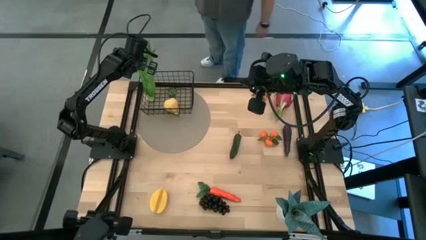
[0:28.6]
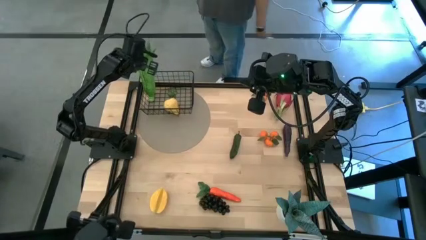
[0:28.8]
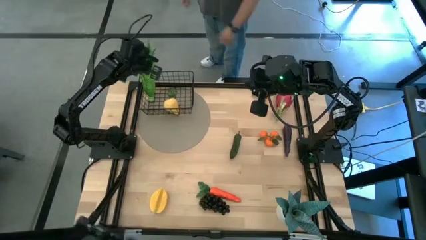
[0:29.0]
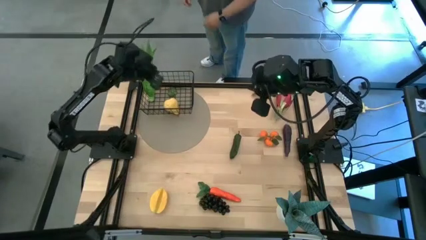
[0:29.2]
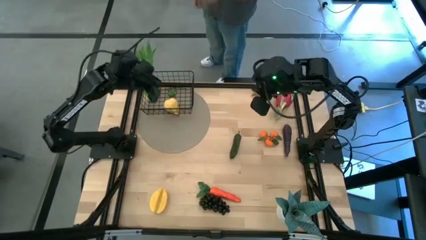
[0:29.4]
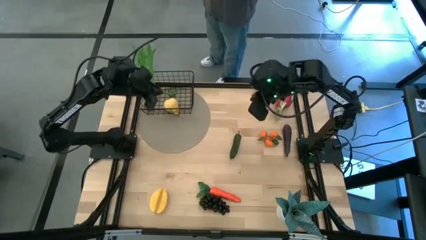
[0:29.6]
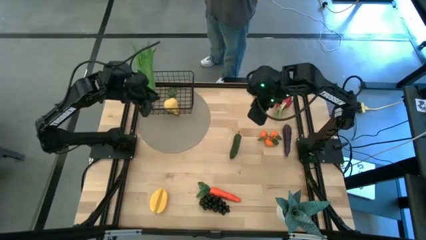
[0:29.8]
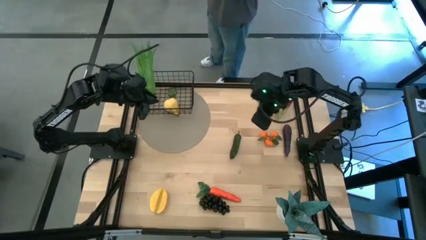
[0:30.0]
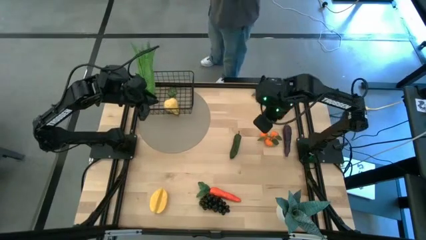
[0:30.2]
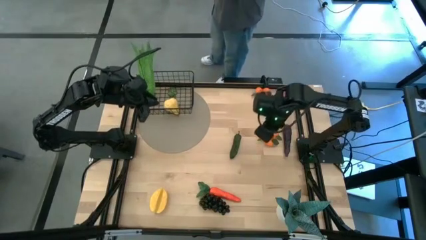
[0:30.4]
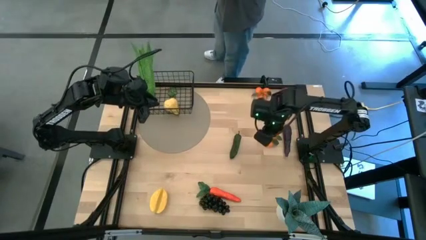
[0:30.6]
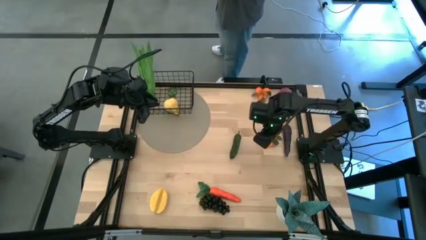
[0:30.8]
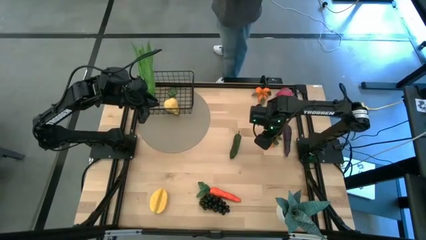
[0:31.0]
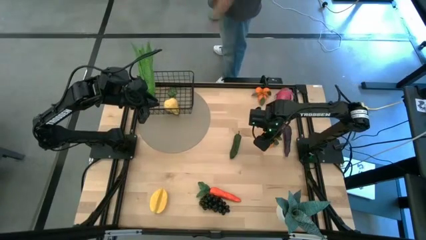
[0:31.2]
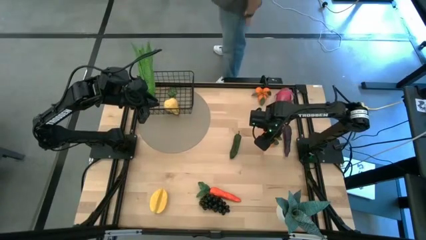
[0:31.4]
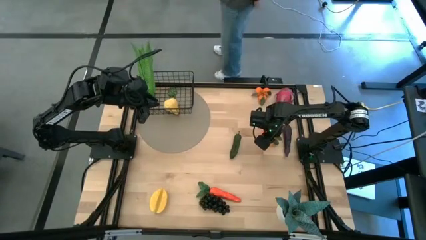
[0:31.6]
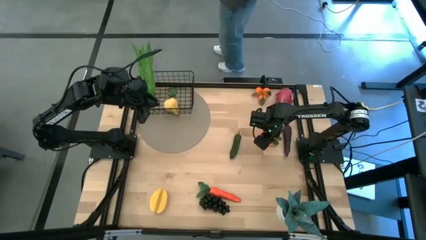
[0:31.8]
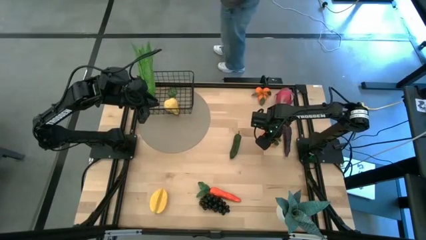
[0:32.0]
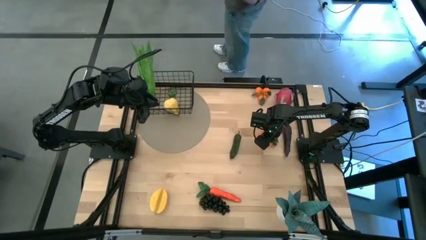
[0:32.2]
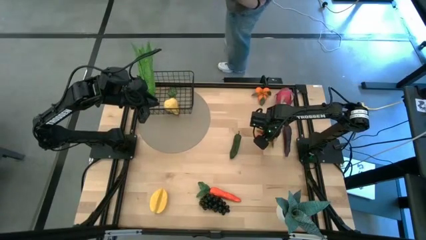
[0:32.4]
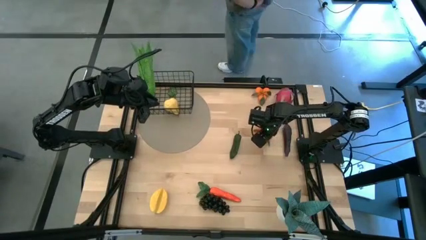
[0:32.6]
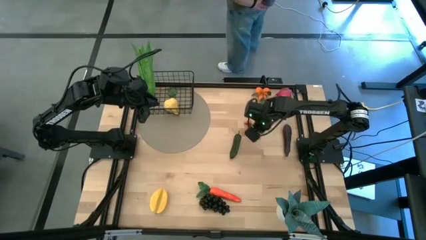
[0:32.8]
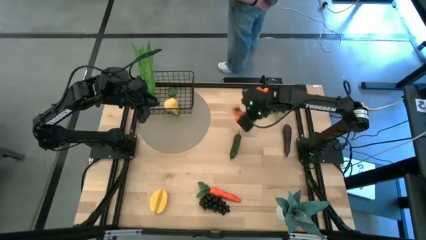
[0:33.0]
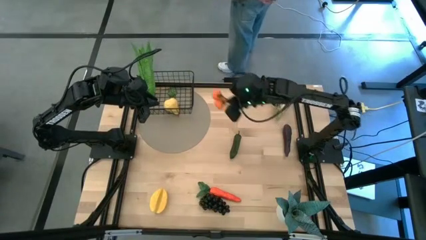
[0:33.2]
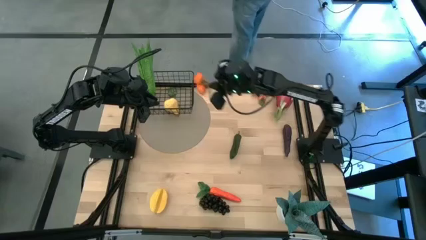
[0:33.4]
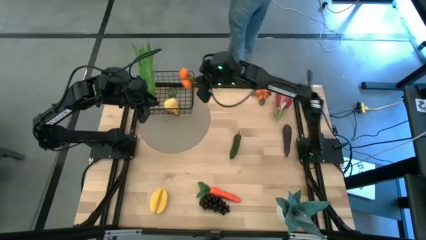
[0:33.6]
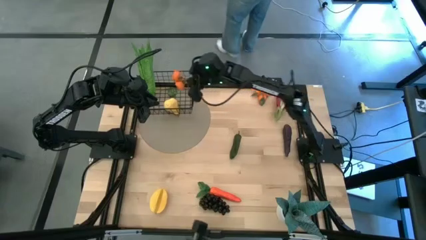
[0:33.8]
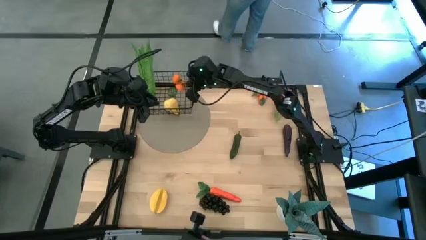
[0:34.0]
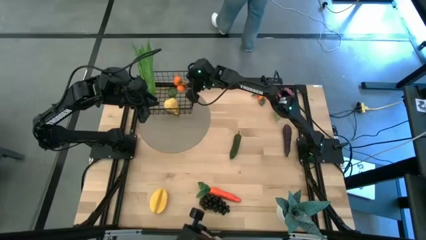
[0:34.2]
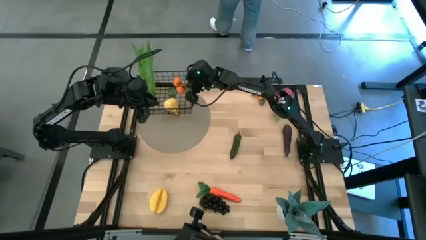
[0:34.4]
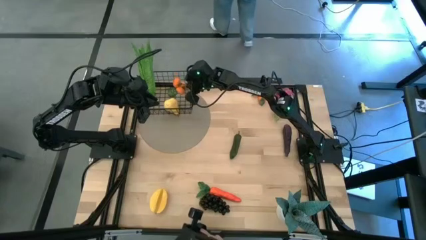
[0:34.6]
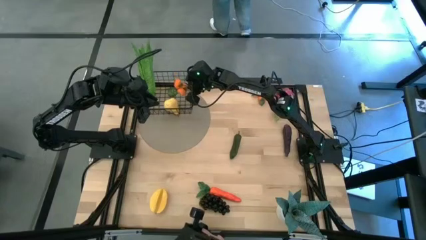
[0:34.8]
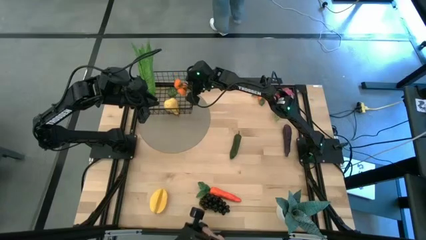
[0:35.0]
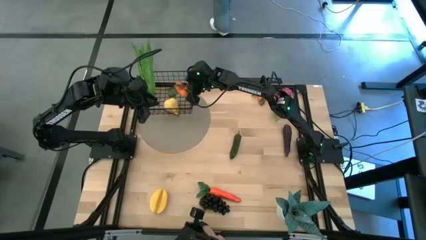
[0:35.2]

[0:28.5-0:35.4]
Task: Build produce basket
Put the bottom orange tangerine into the wire basket

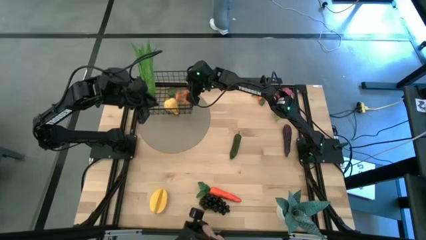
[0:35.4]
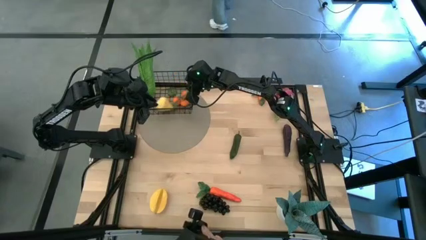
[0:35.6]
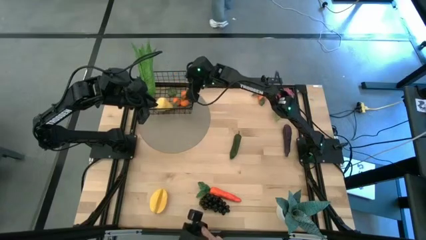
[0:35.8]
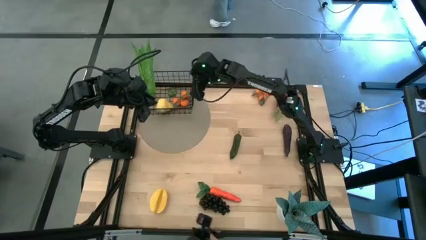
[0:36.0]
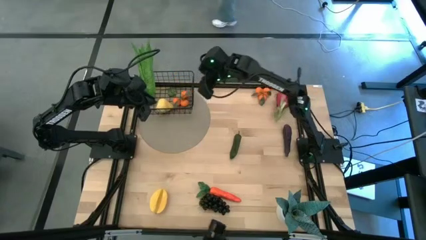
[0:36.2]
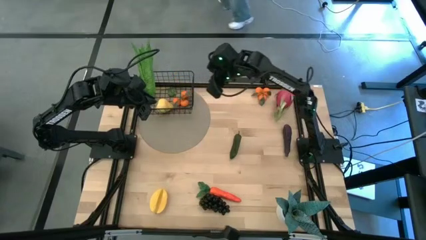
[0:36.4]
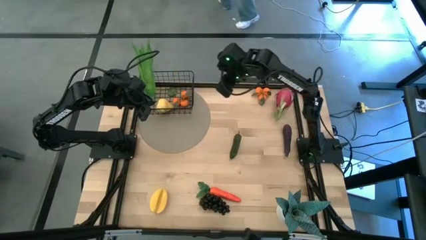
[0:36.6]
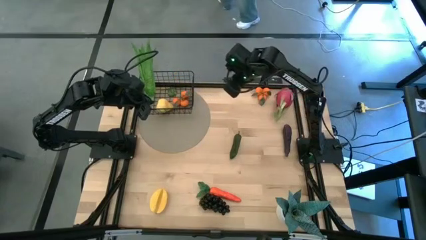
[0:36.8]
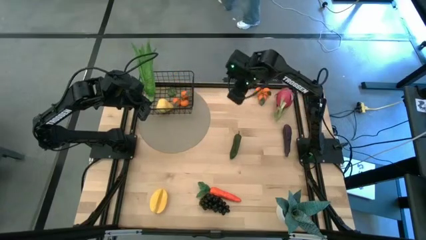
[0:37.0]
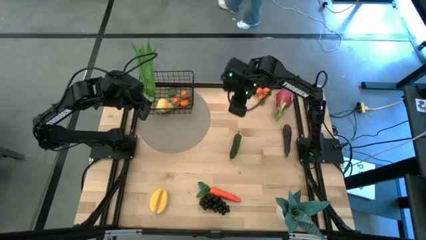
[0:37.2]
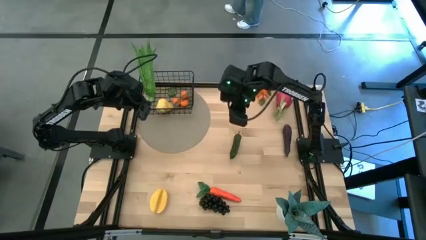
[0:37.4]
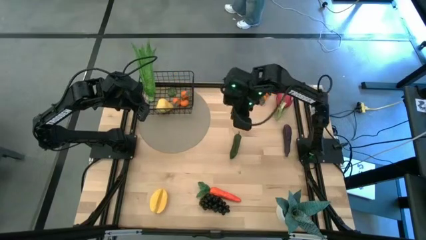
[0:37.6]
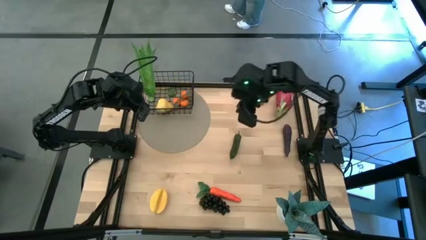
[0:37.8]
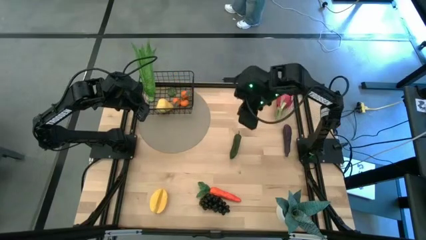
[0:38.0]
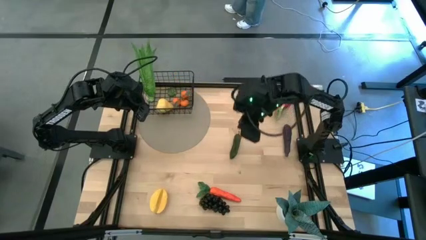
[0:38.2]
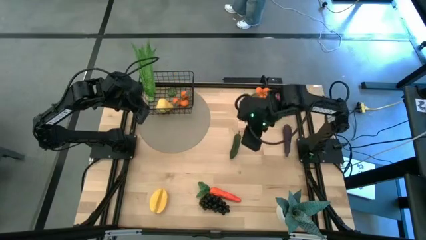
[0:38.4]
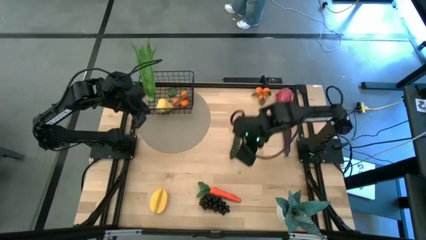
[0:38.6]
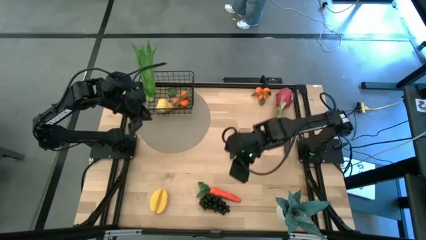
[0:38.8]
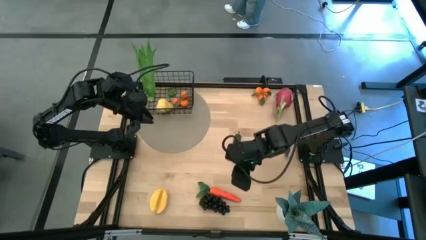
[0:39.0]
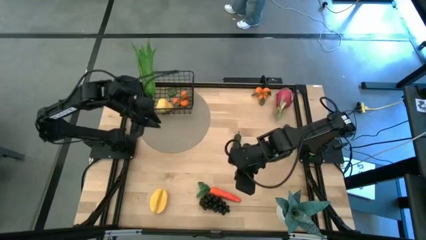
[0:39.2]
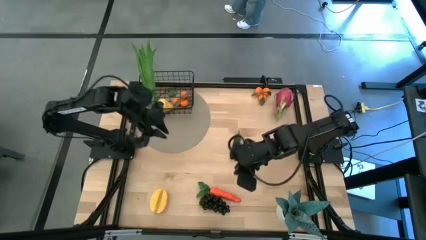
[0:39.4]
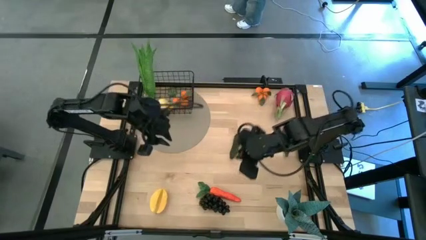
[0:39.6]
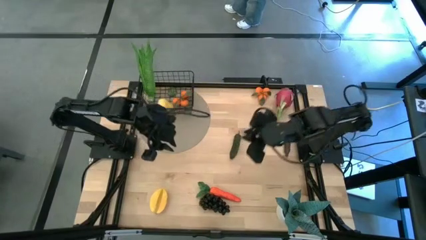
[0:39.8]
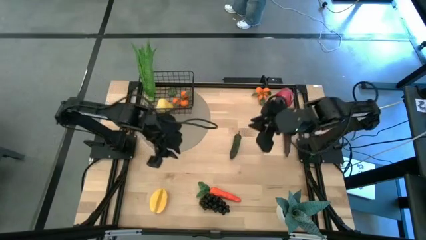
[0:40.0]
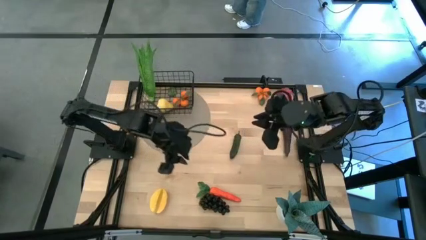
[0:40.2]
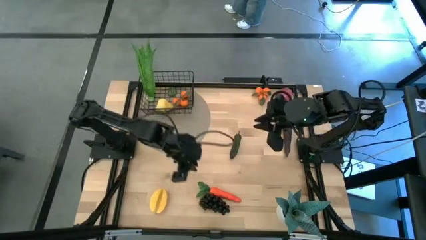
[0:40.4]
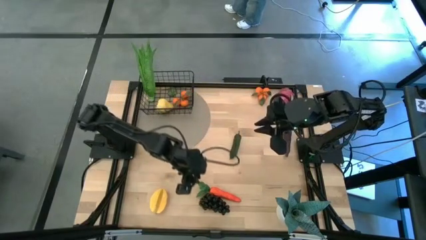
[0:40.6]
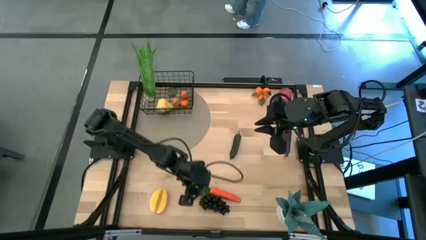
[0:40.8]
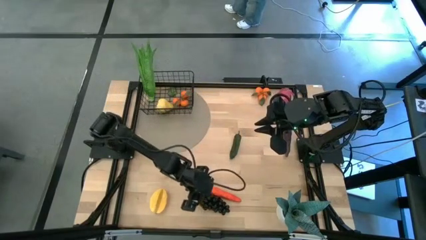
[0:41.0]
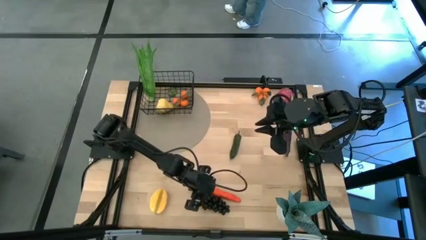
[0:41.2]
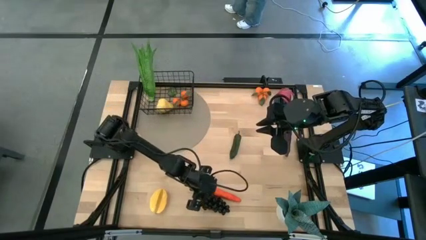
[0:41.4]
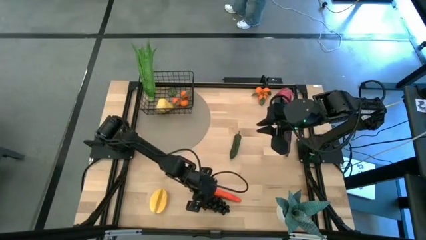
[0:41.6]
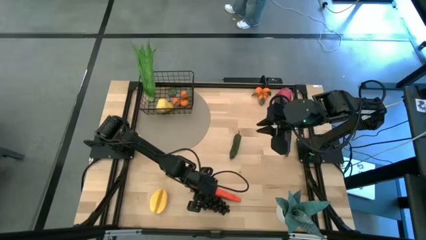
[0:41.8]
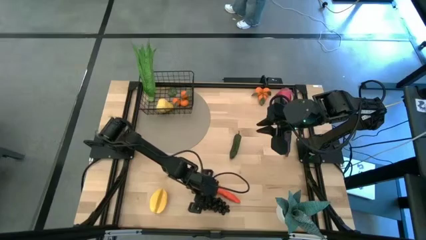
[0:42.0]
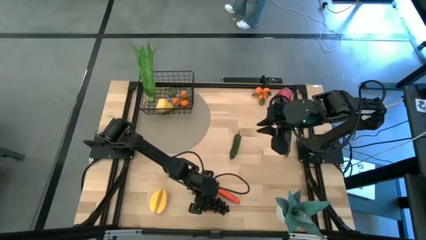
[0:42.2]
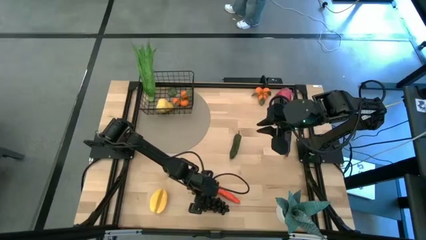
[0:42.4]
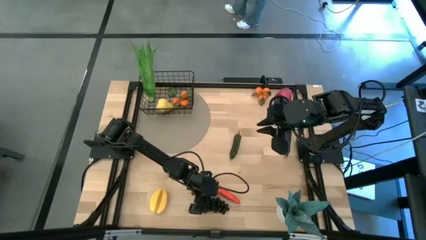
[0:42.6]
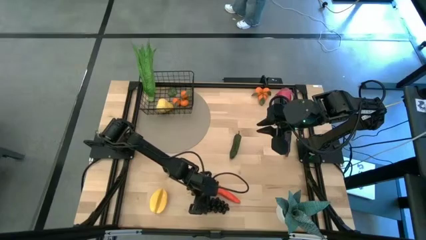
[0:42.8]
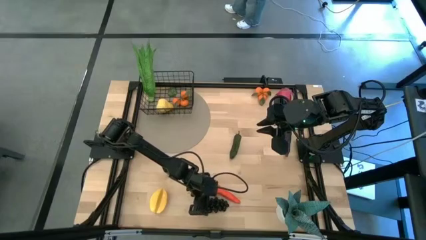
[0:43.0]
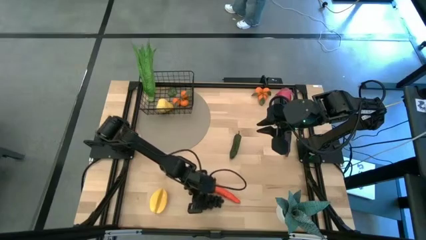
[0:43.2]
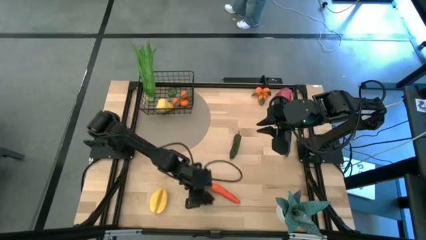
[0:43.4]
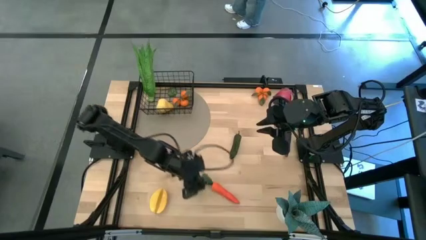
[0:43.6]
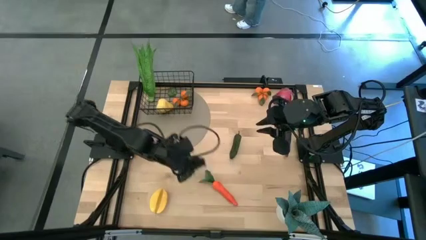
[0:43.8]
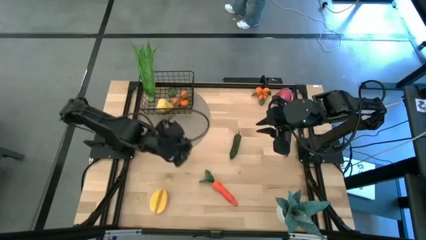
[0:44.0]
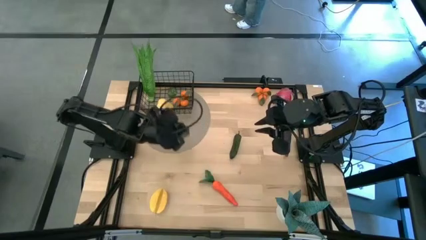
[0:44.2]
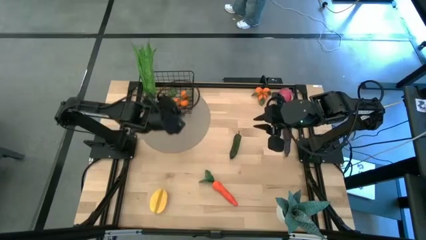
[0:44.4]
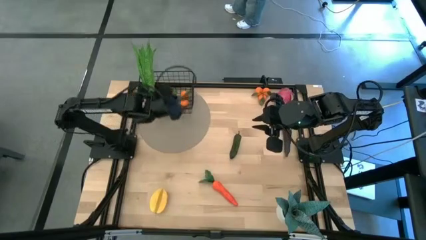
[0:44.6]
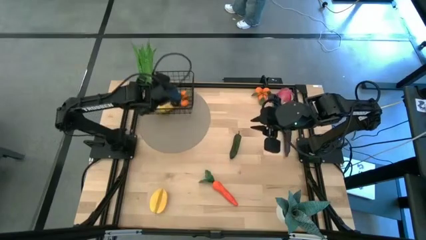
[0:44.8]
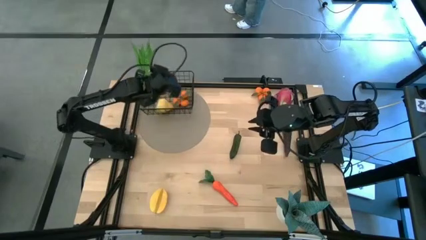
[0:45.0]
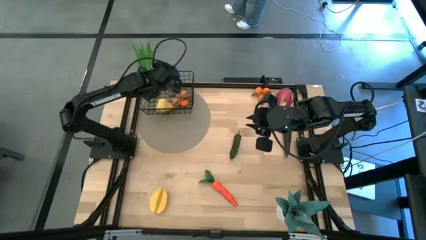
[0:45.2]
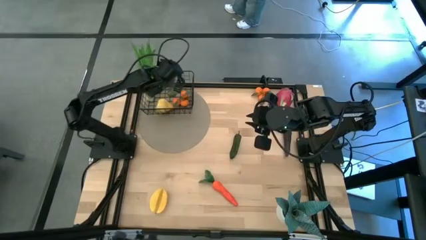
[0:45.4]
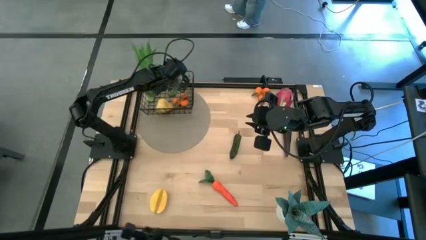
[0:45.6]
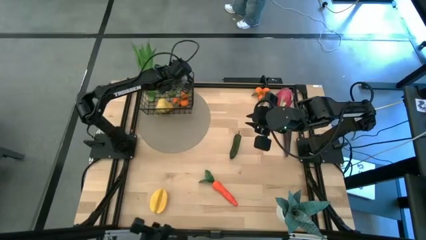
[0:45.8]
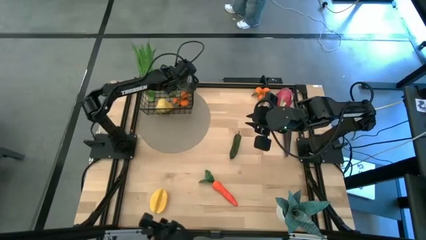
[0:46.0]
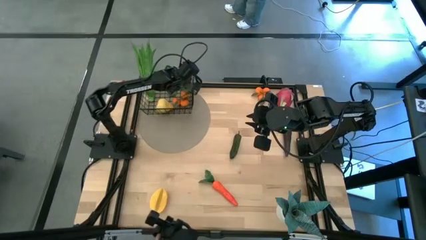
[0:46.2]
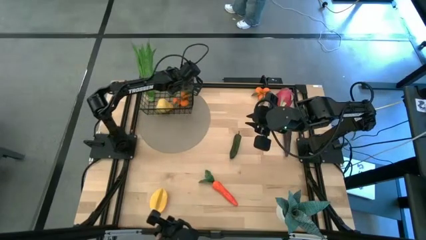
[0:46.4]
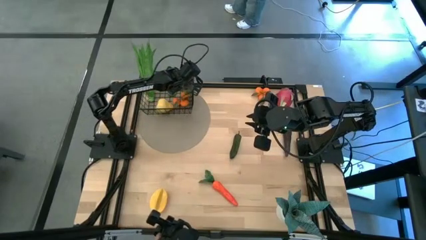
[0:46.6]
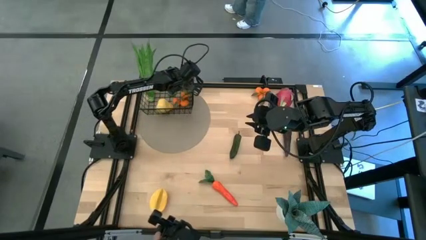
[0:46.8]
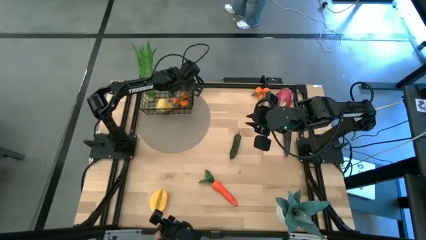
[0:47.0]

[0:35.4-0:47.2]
Put the dark purple grapes into the wire basket
